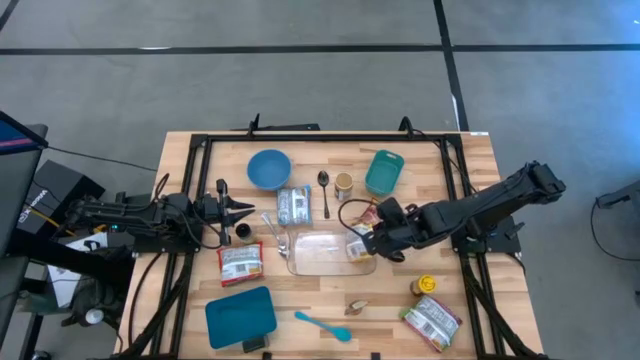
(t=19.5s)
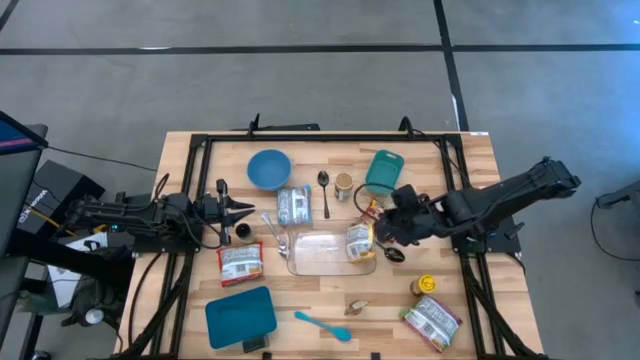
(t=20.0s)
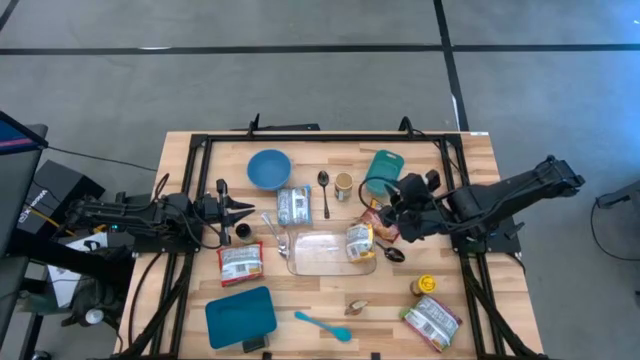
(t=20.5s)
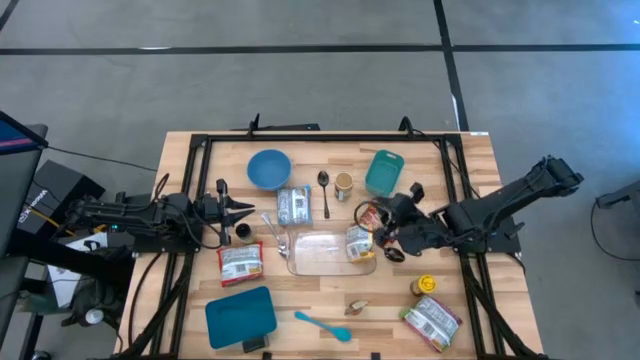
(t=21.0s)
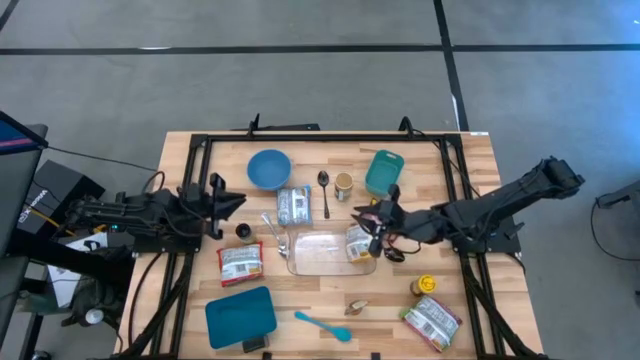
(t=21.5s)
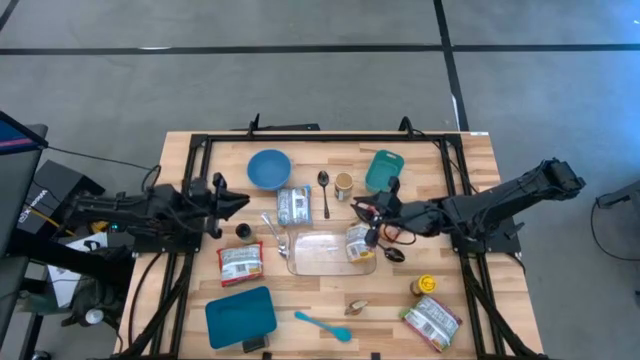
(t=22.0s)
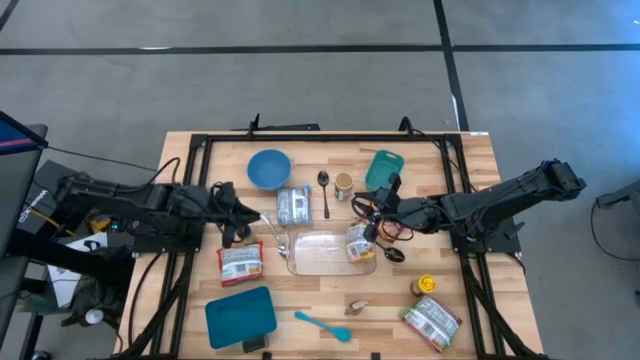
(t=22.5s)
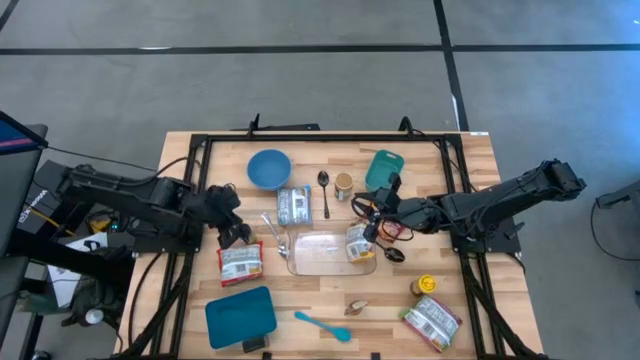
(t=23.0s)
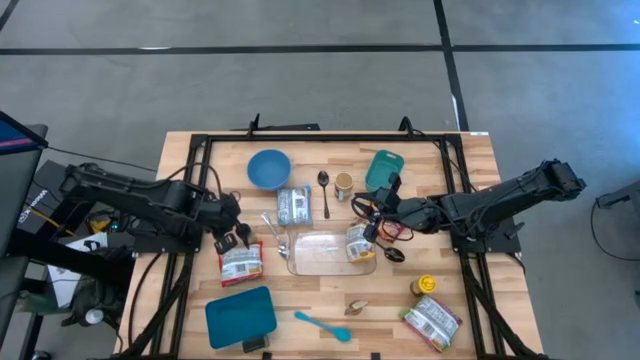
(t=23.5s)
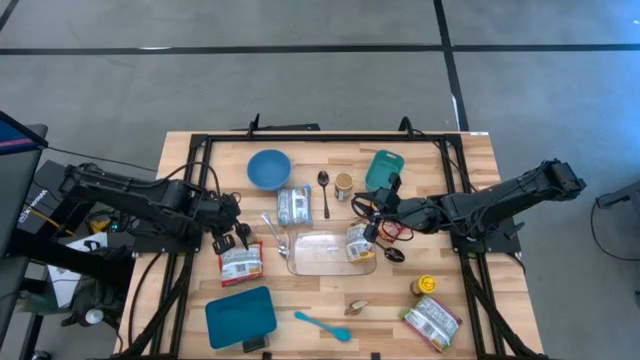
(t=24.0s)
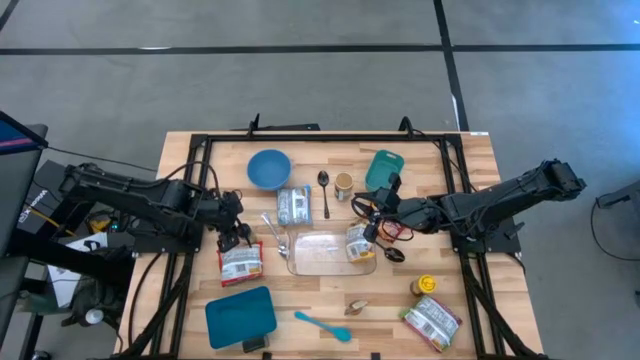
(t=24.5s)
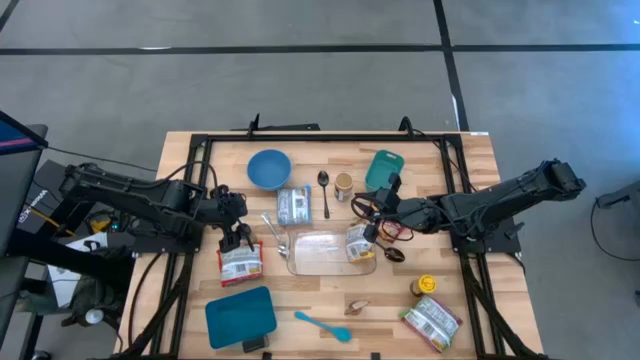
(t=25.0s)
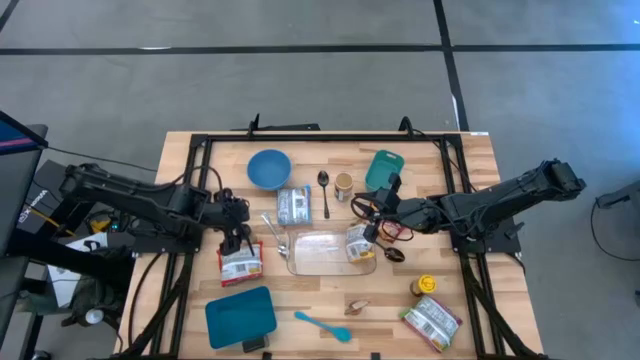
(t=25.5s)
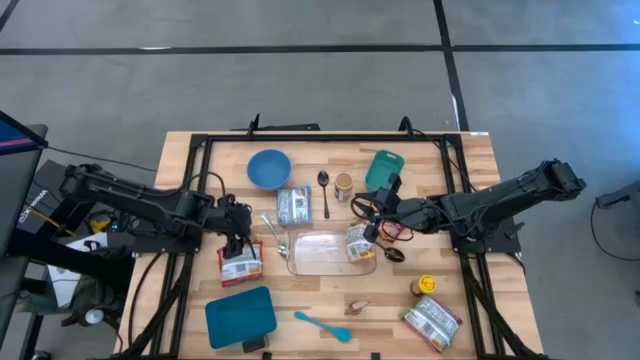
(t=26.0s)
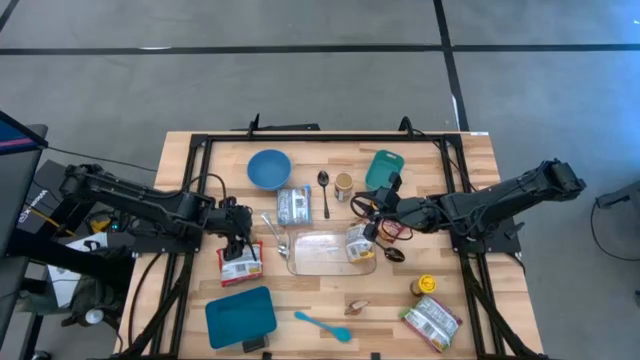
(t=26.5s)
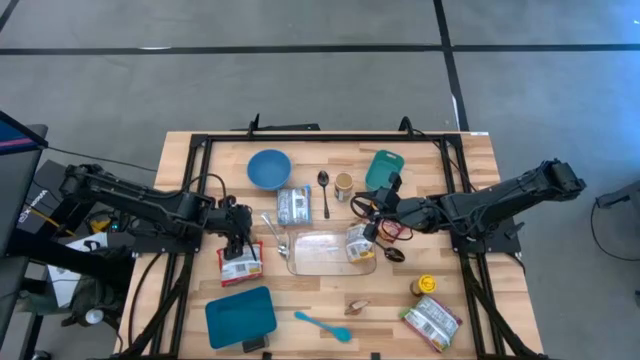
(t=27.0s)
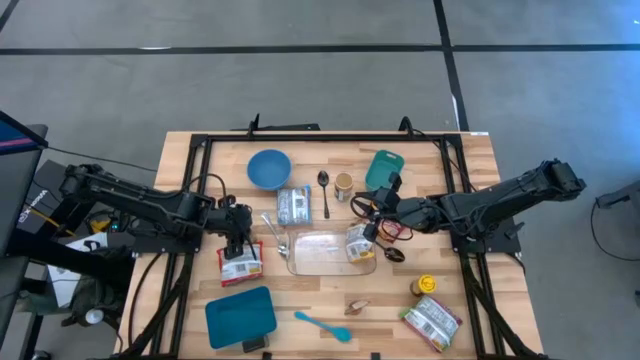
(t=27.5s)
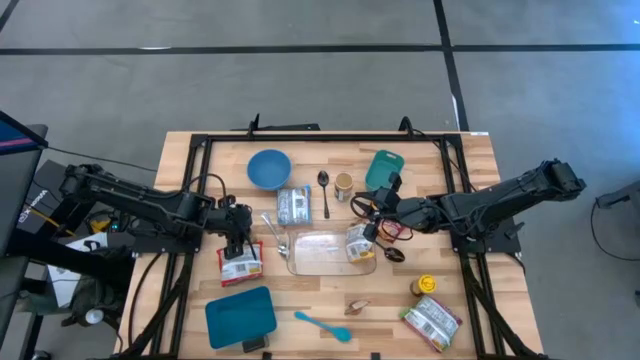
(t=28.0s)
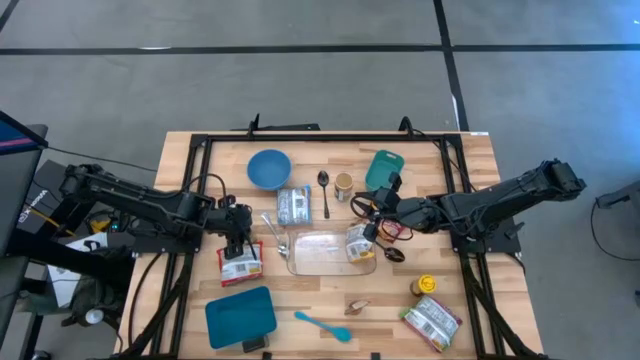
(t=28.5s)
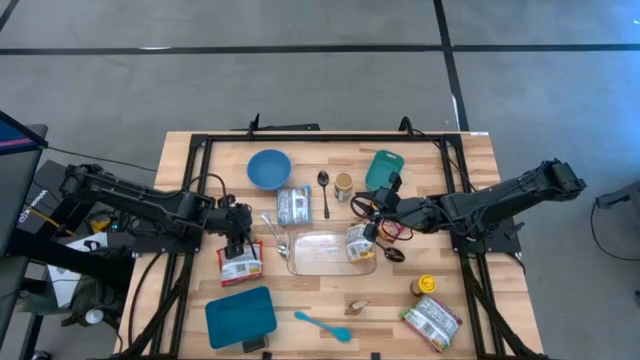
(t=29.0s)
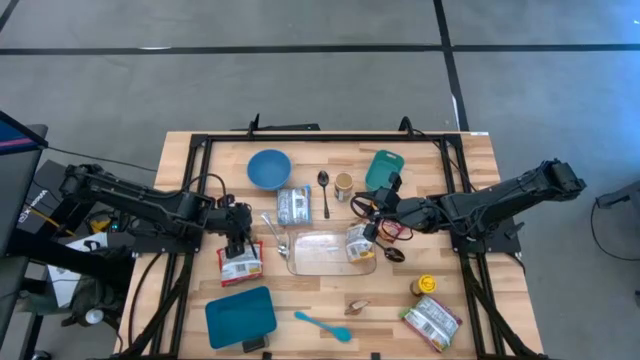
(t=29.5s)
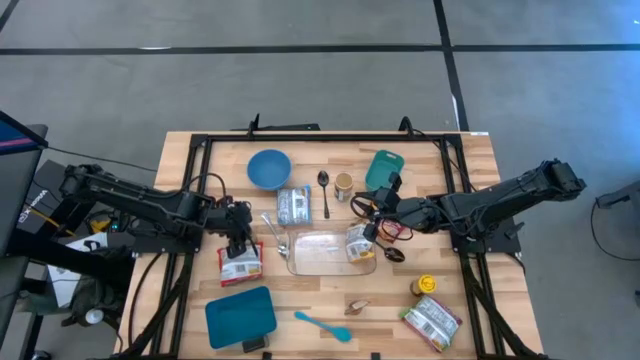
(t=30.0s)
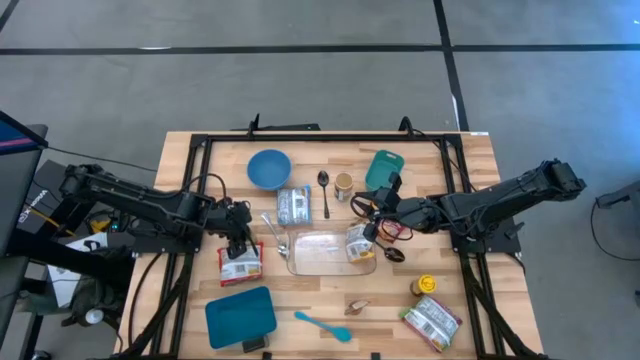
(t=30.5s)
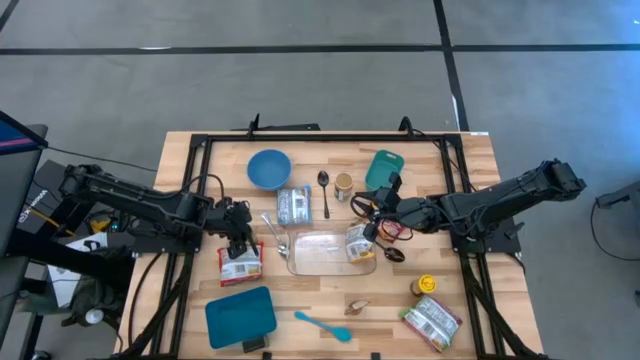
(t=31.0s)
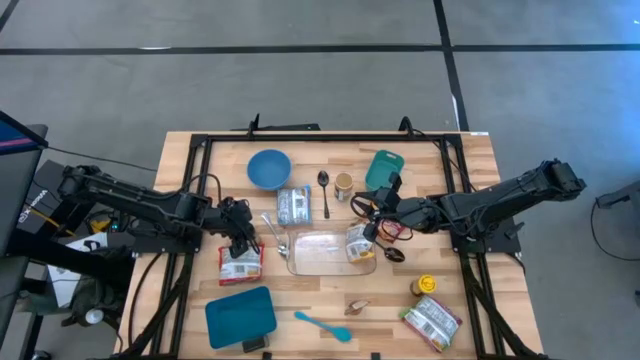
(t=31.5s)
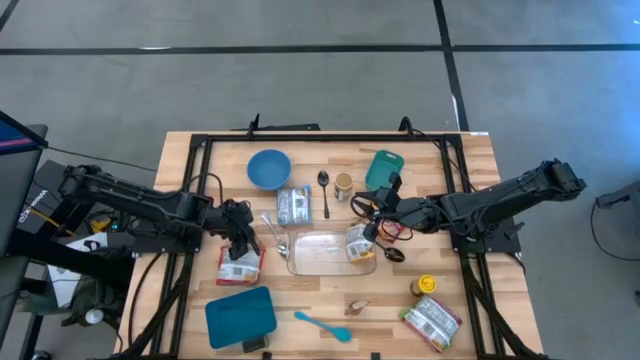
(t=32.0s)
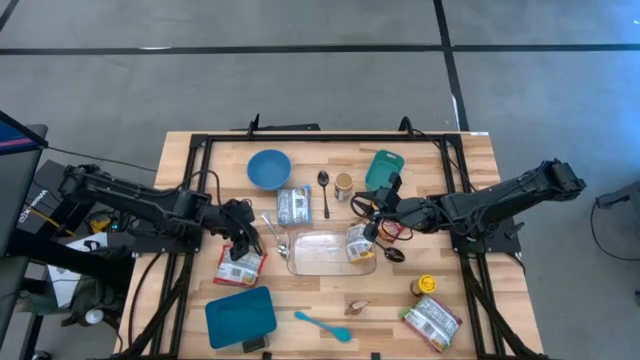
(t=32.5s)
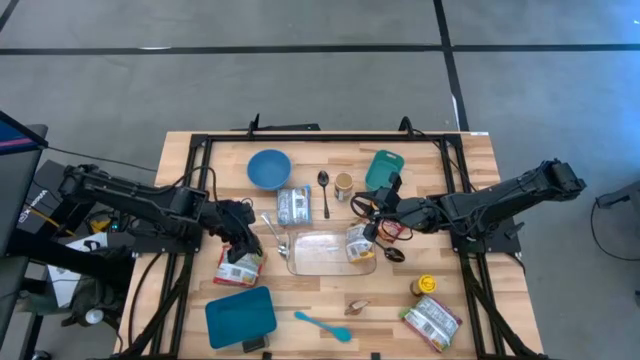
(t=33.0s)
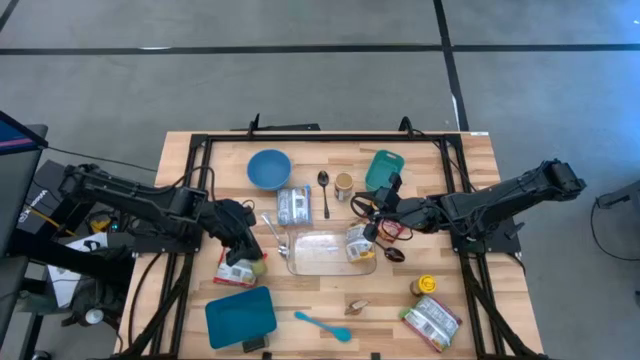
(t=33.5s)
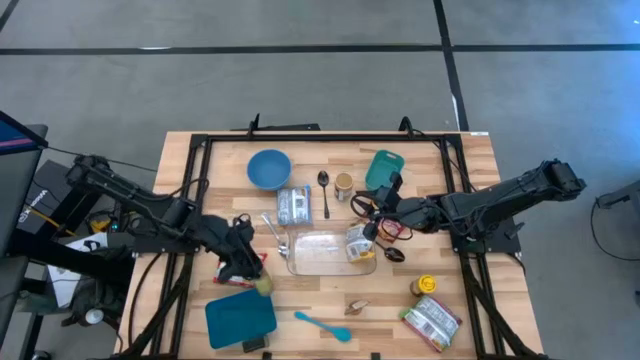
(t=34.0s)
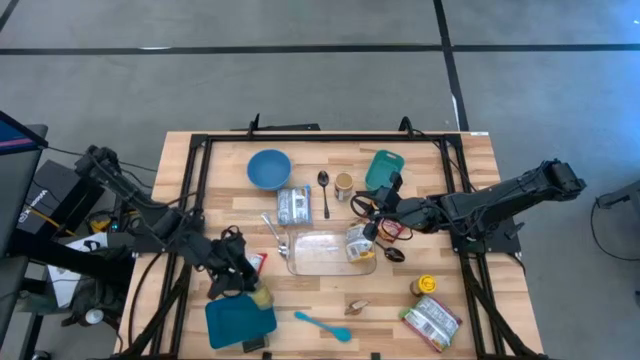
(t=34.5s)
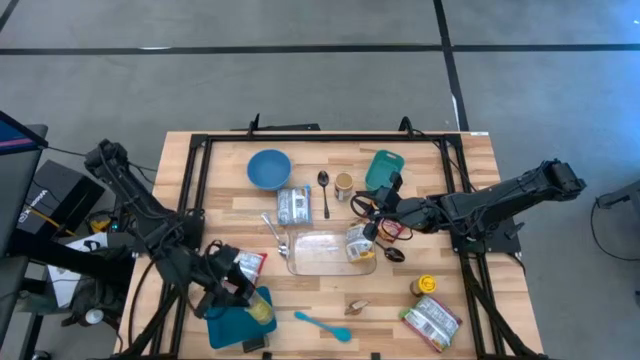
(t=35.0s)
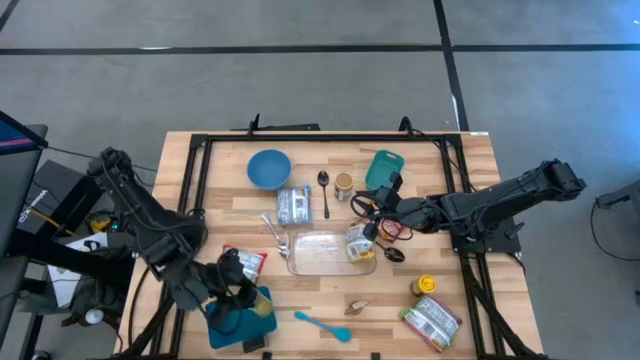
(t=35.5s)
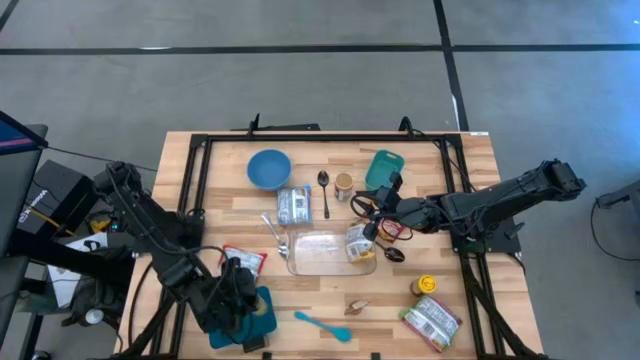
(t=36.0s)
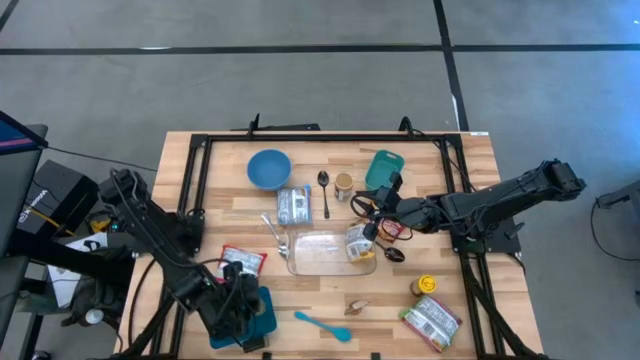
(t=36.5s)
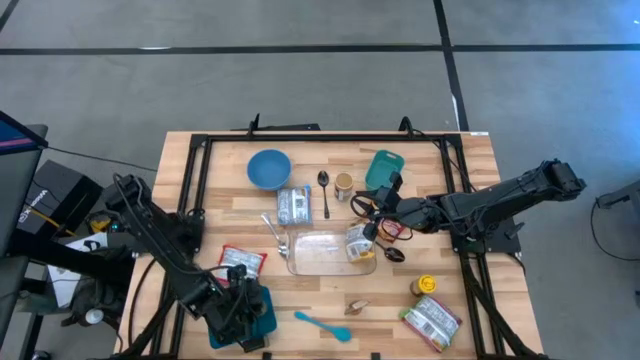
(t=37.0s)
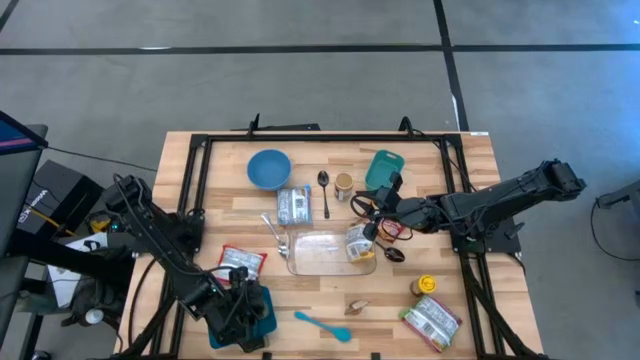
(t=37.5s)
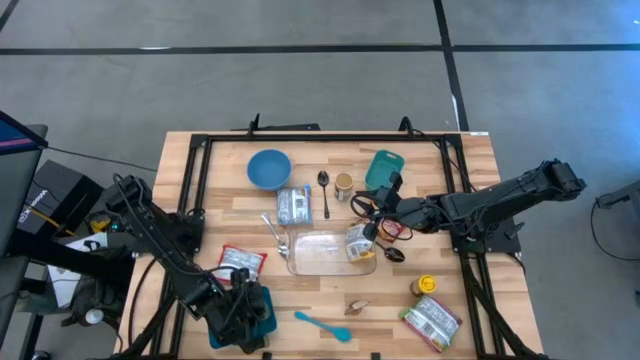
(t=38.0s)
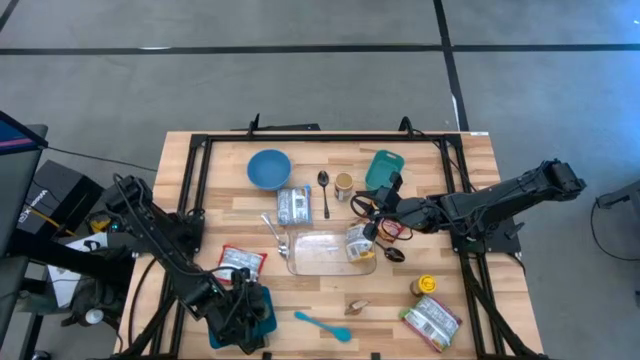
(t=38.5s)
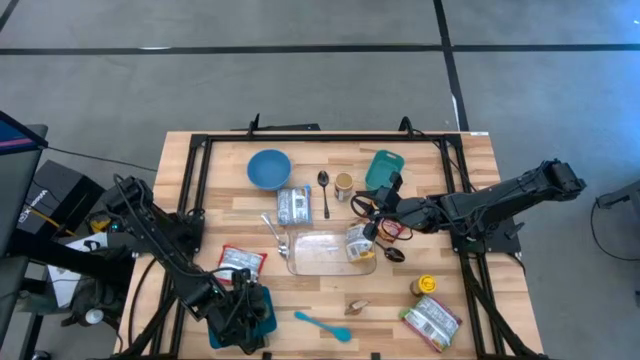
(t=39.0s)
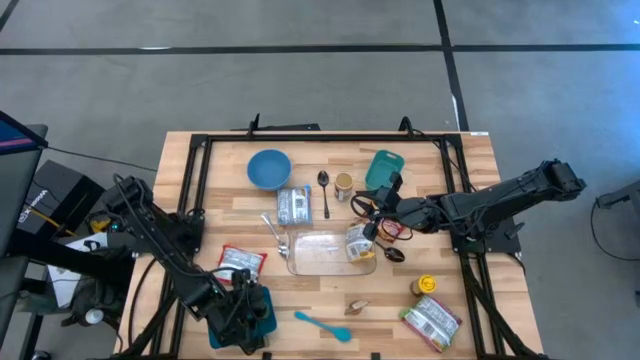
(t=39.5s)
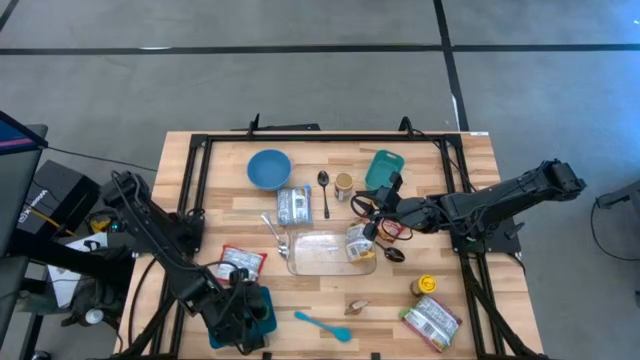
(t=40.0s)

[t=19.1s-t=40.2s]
Task: Pick & Place Food Item
Put the black spice bottle into the dark blue bin

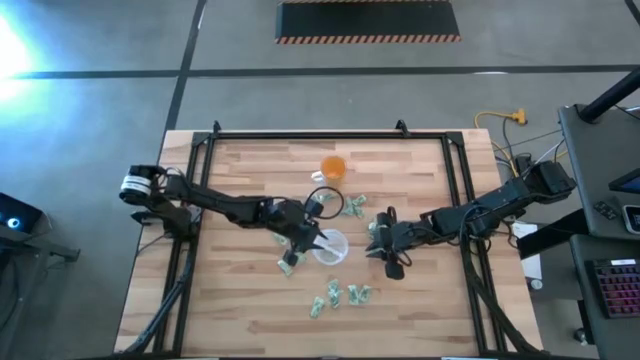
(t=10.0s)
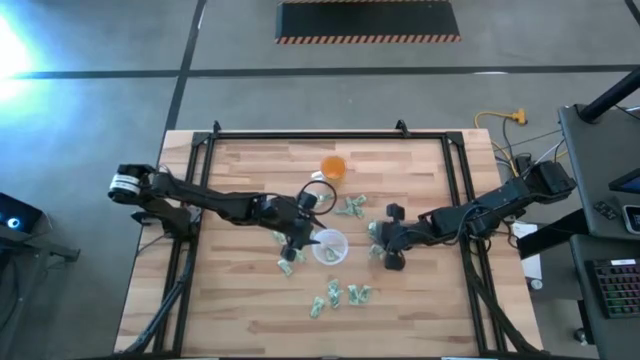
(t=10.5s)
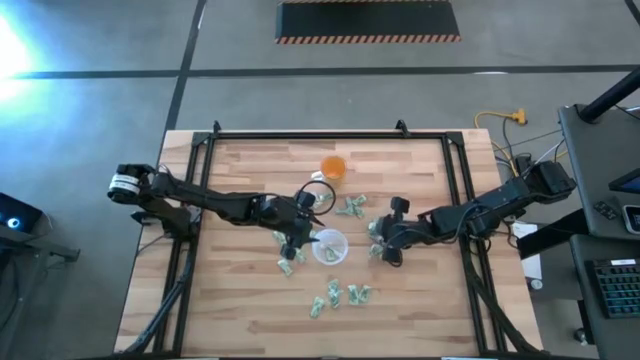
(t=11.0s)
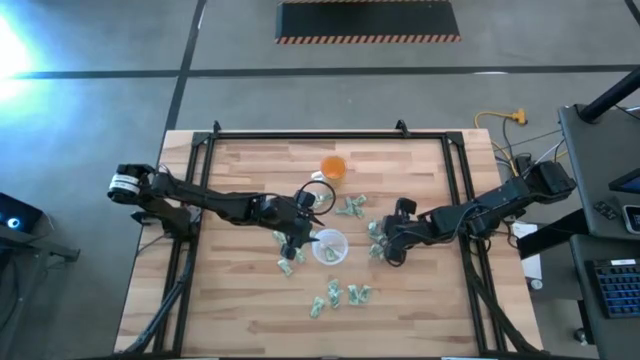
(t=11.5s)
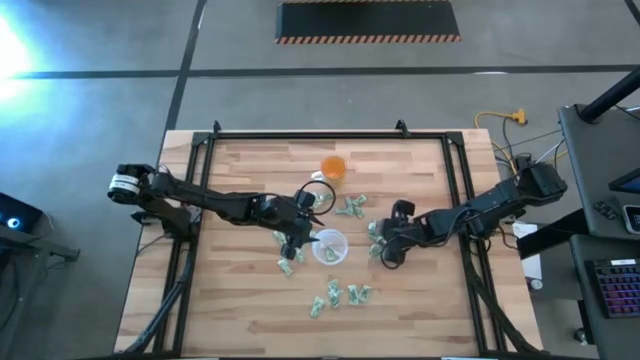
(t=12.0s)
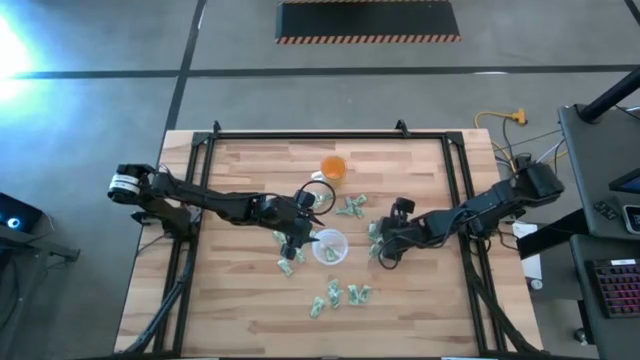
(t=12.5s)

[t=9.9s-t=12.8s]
Task: Pick and place Stevia / Truvia into bins
Put the green stevia packet into the transparent container
